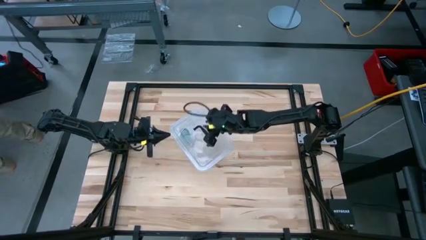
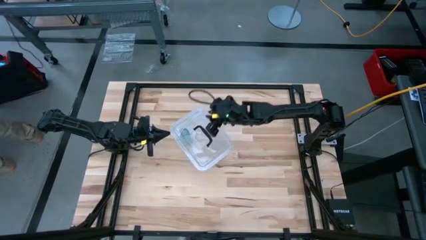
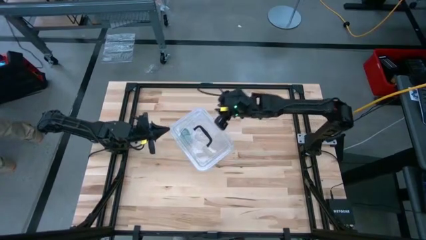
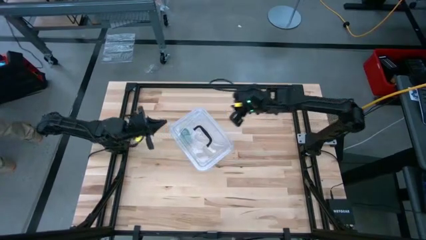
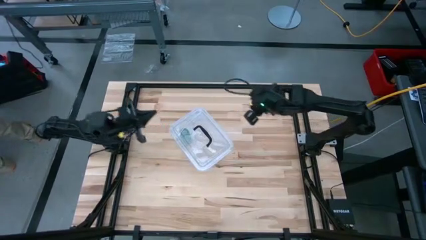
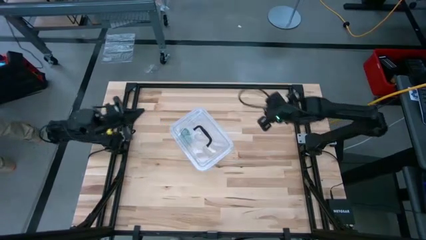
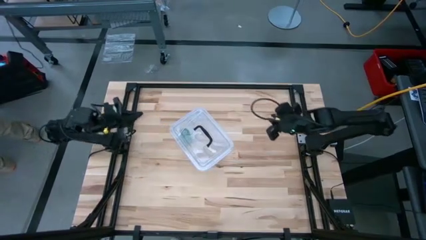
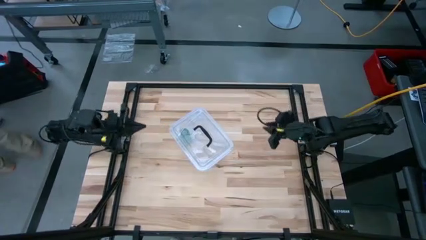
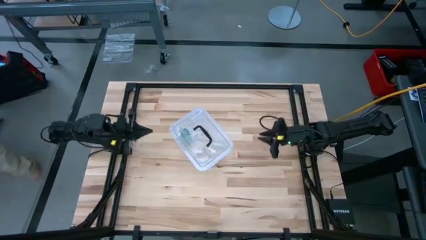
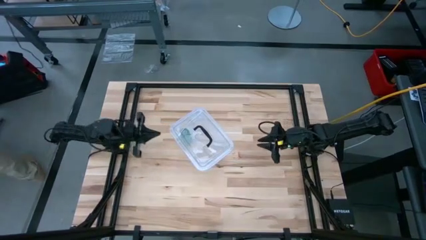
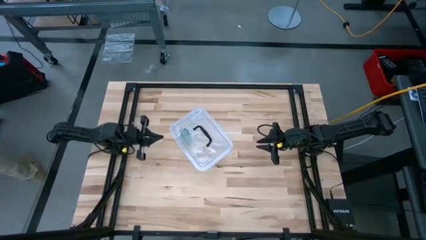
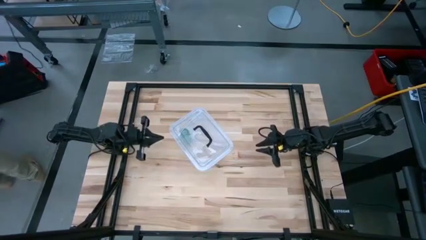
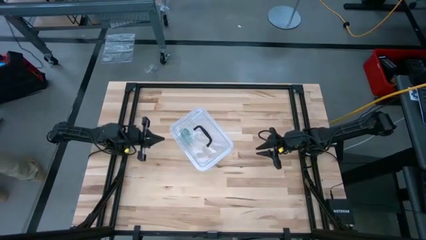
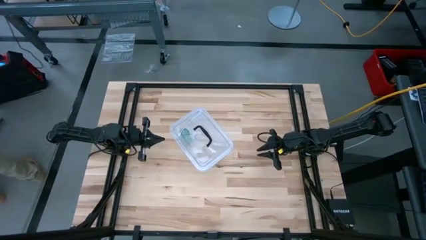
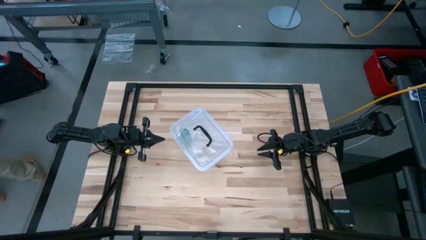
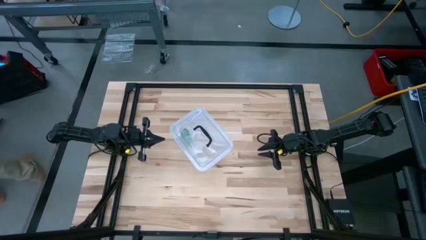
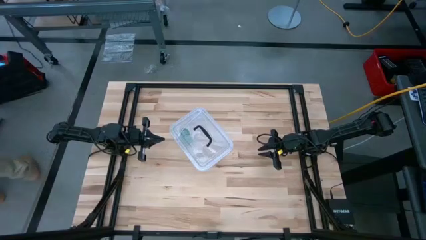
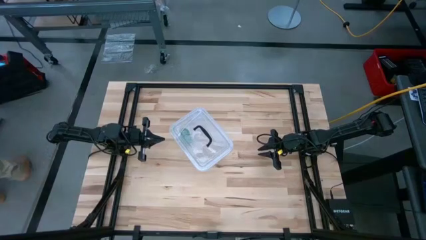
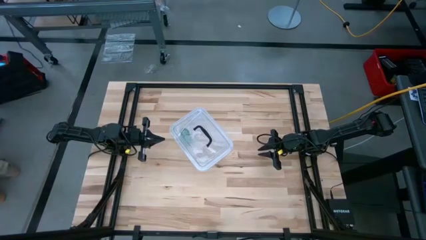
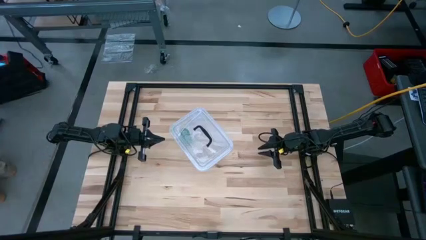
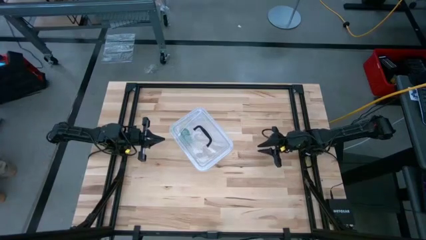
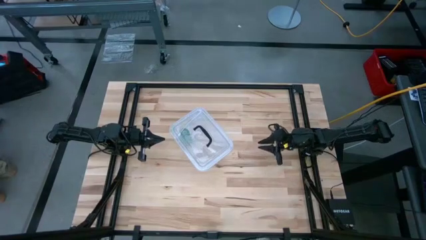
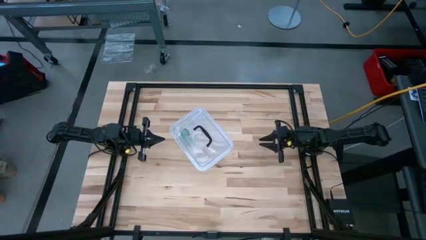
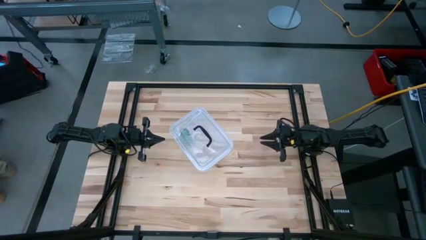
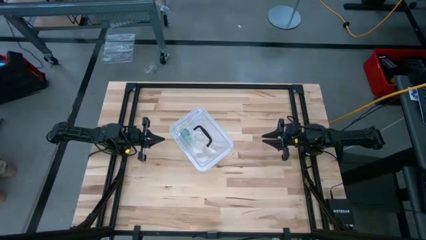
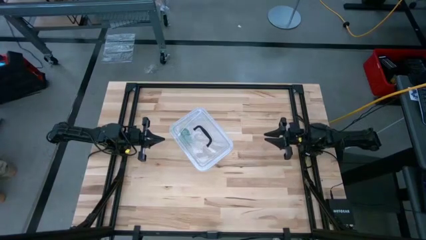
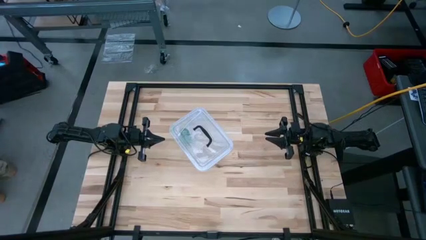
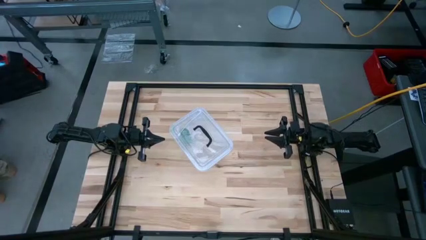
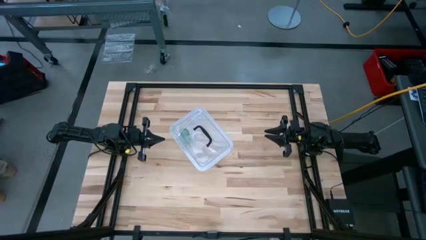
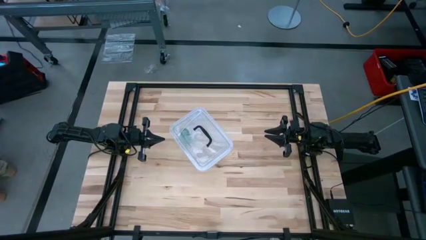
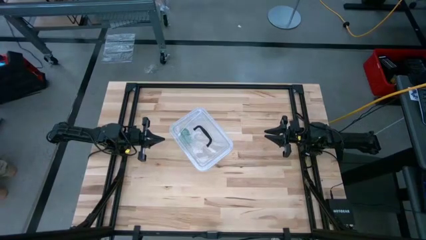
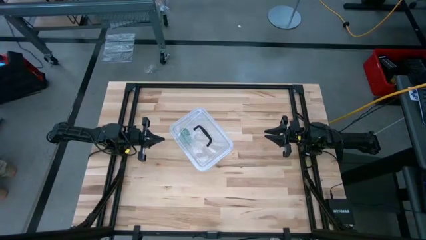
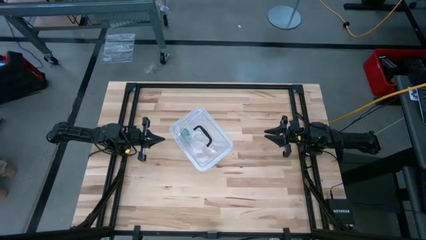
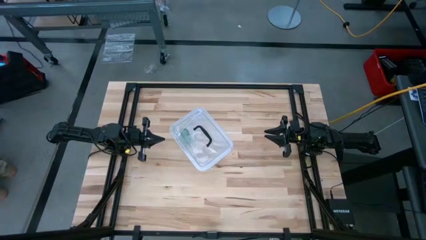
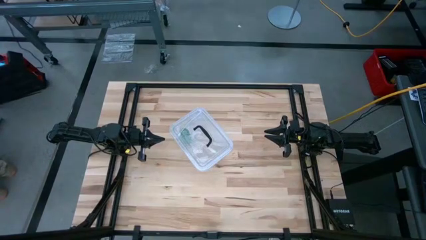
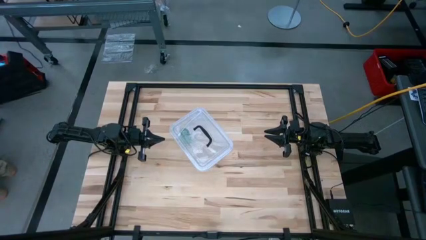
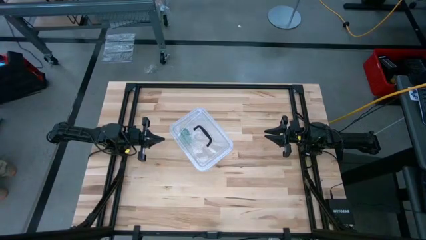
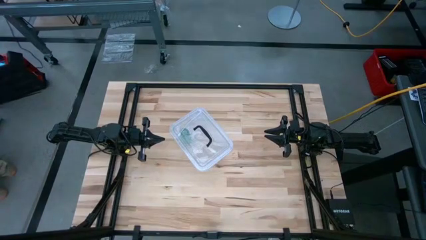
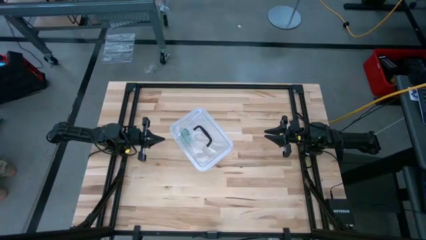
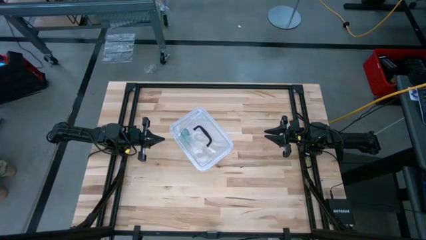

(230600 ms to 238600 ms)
Task: Roll bandage
Return to Home Position

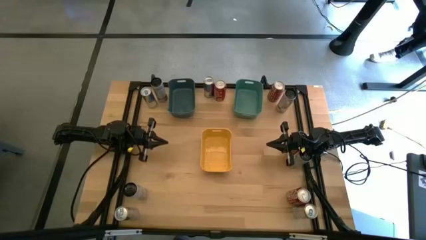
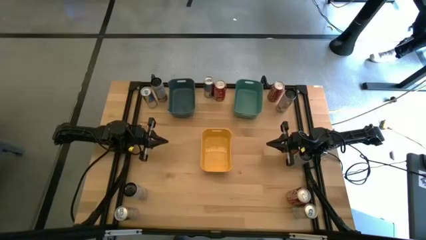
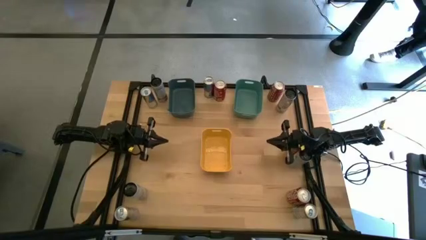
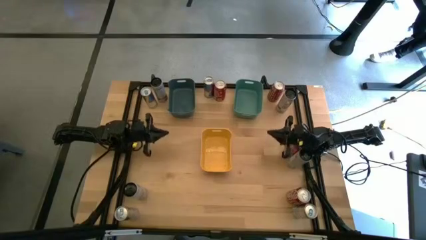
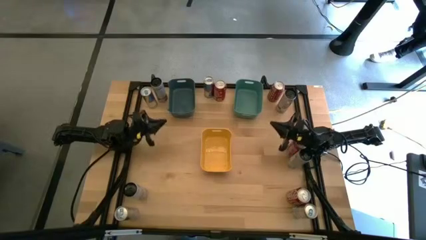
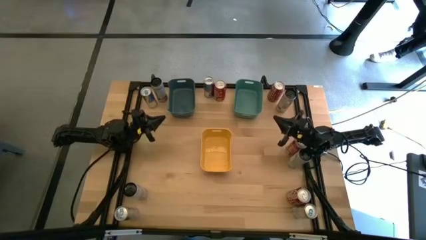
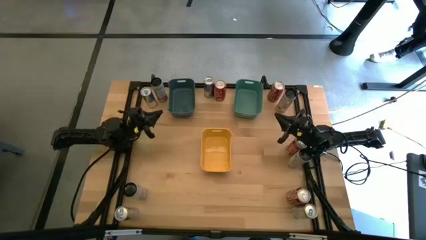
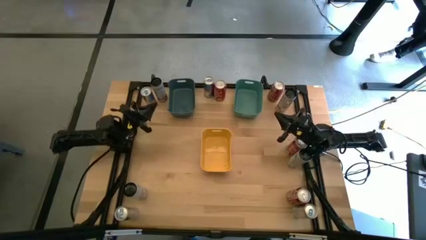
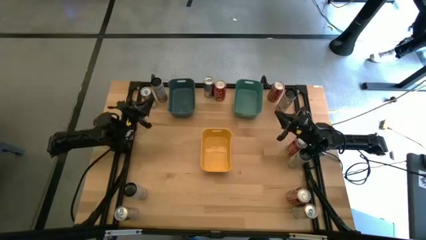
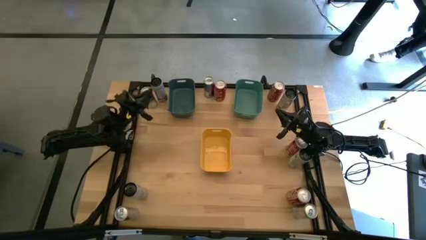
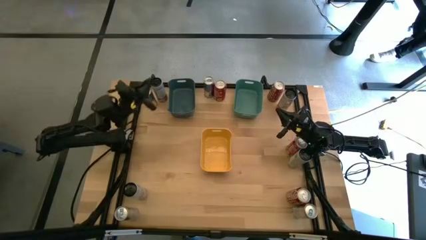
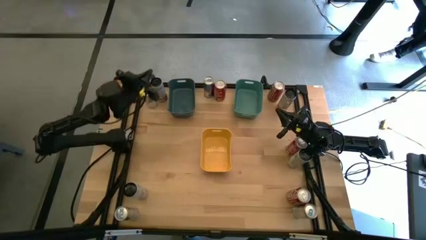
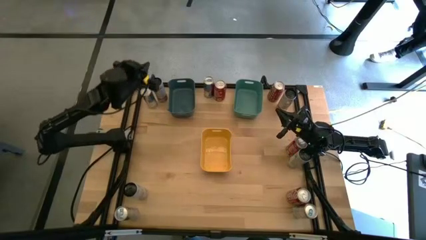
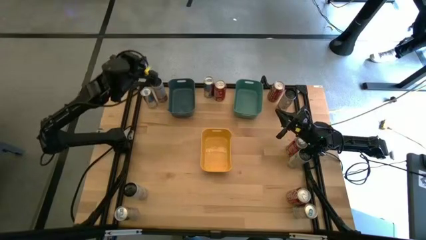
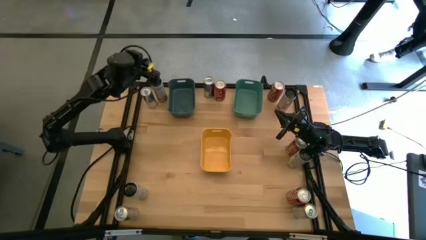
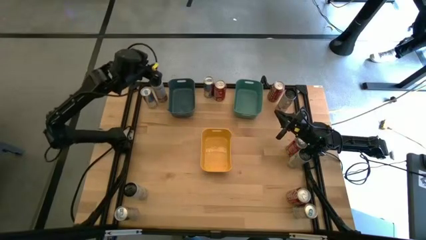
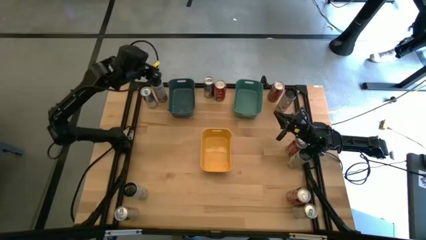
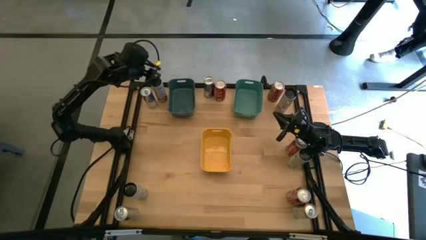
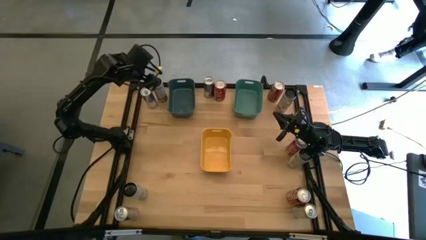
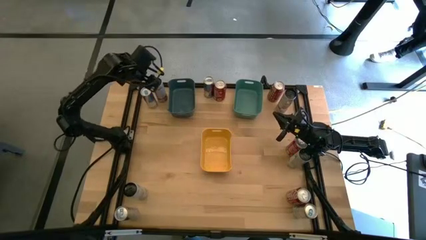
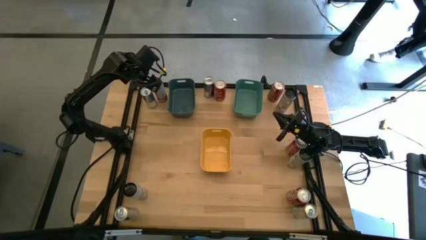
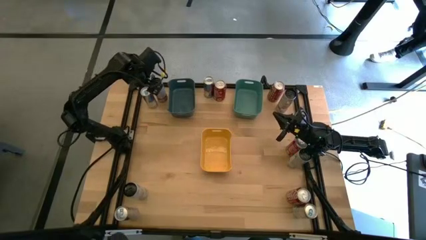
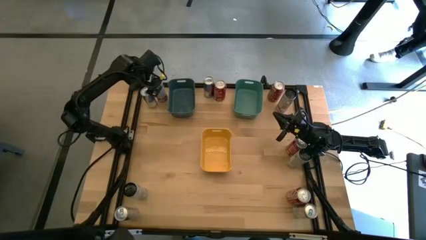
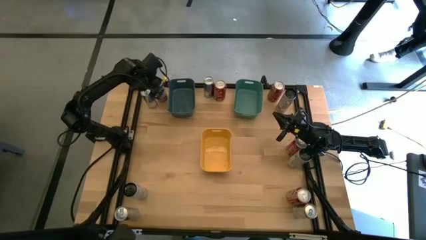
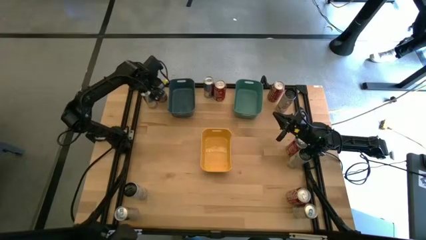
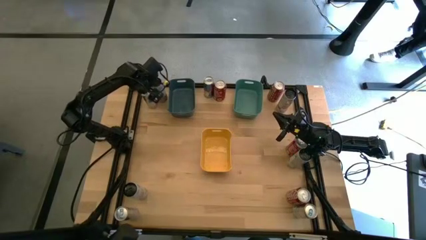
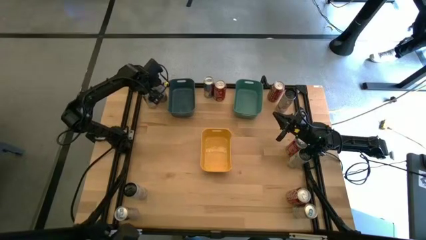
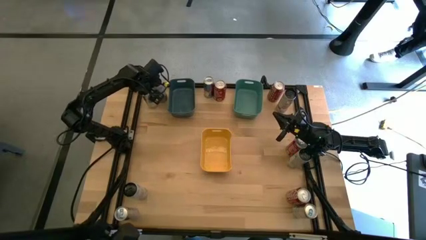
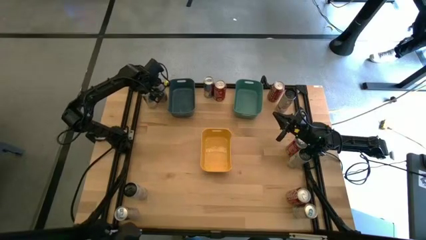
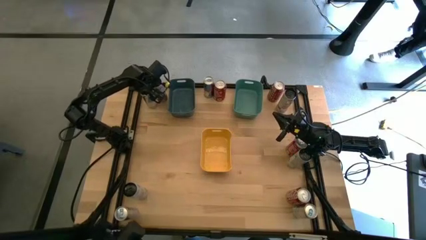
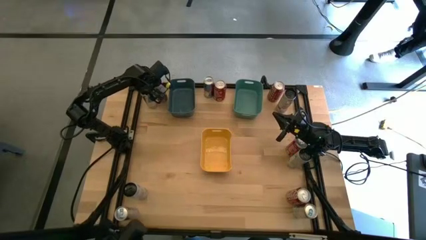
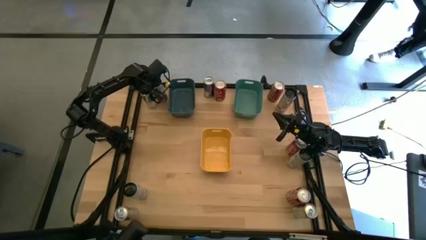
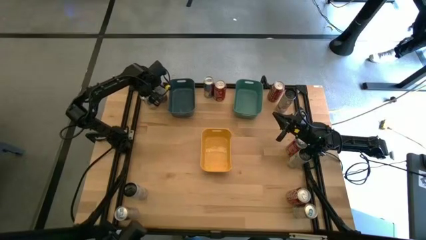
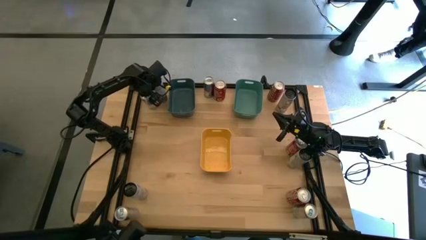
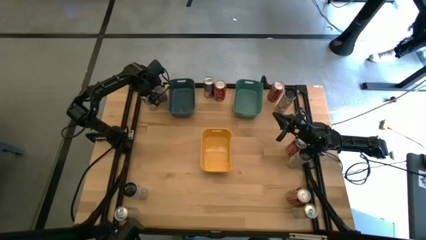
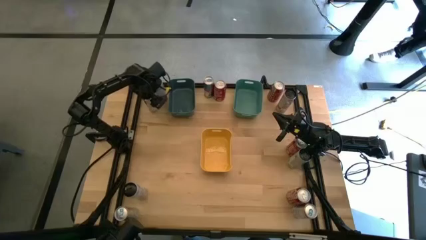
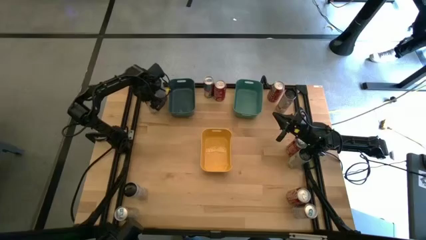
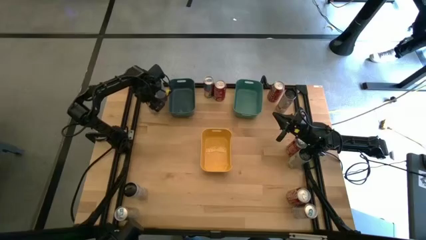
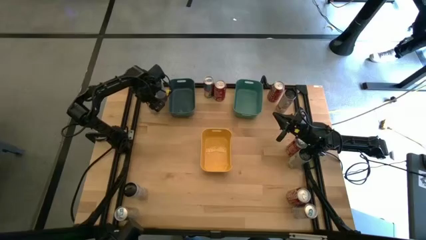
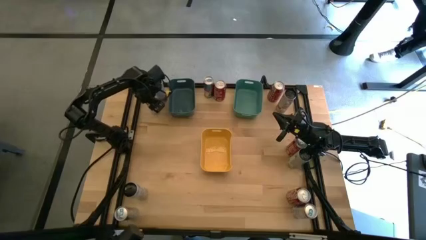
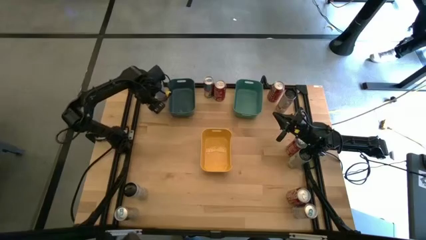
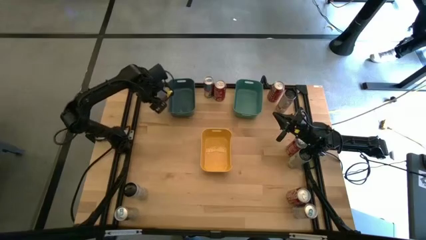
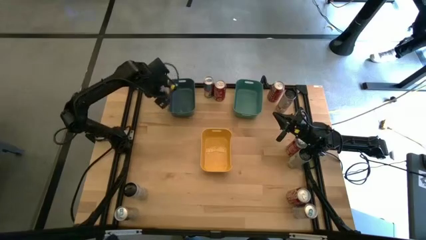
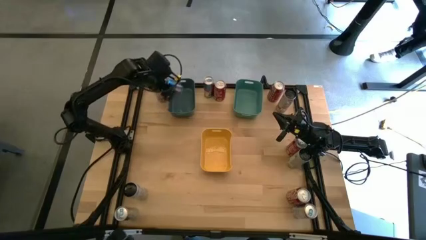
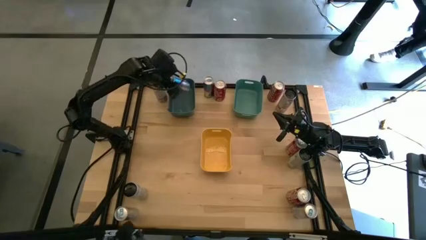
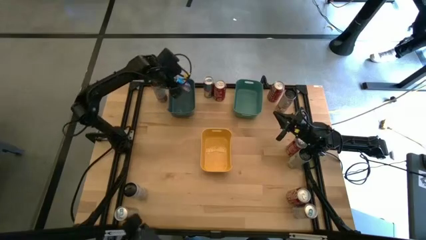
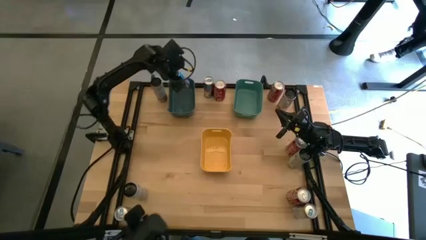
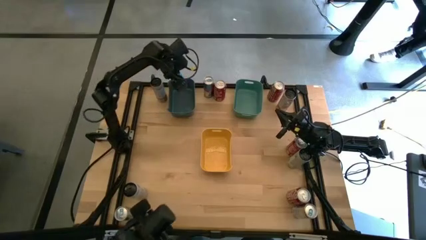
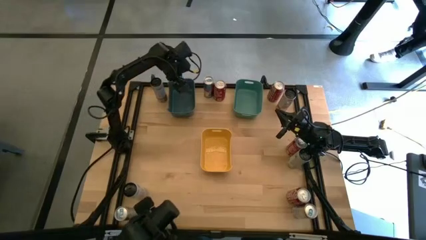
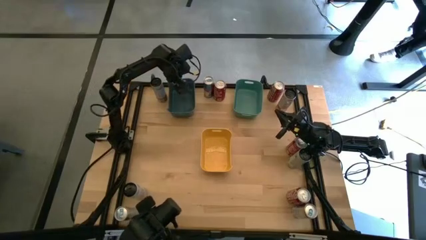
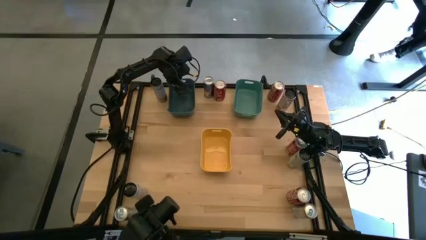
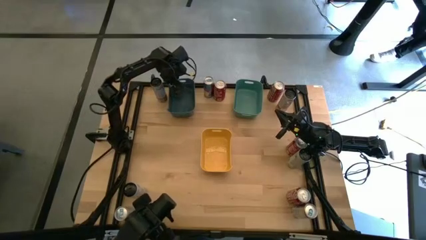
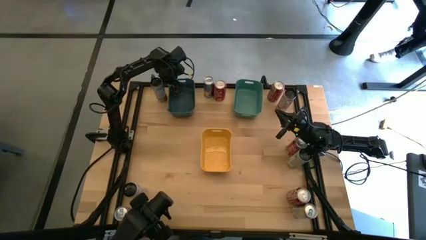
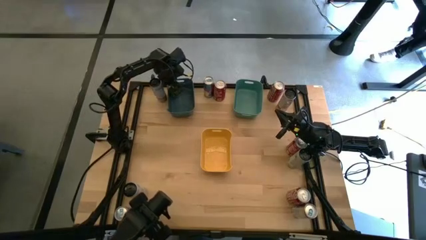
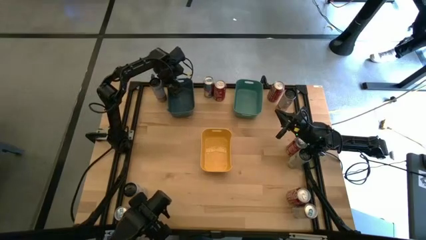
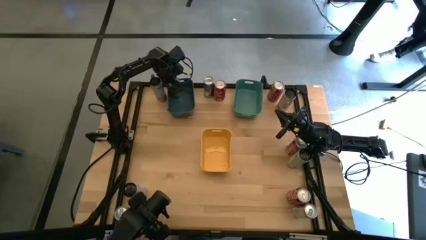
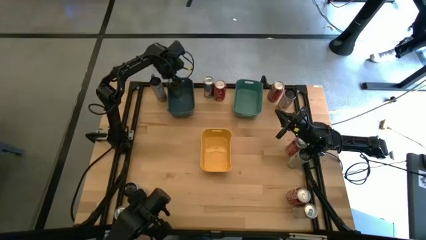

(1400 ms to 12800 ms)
Task: Sort soda cans
Put the top left blue soda can into the blue bin
